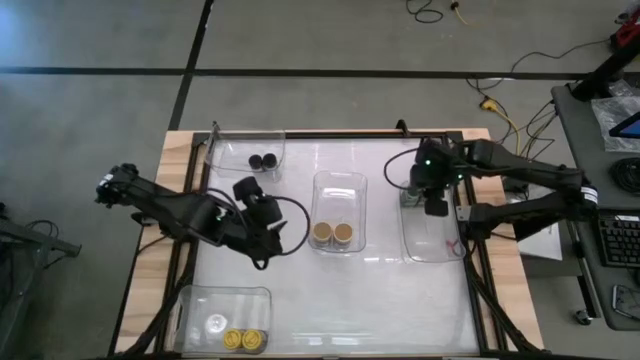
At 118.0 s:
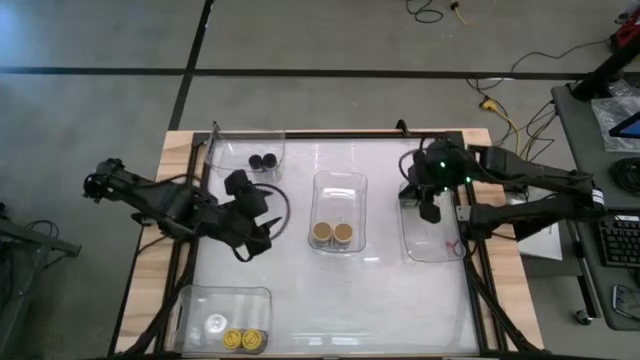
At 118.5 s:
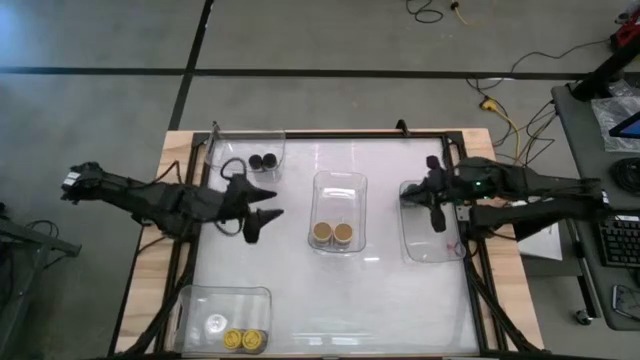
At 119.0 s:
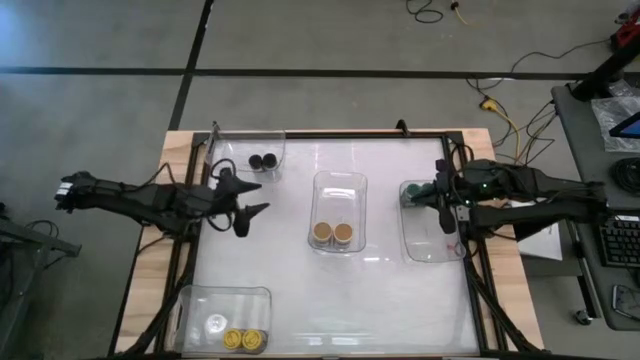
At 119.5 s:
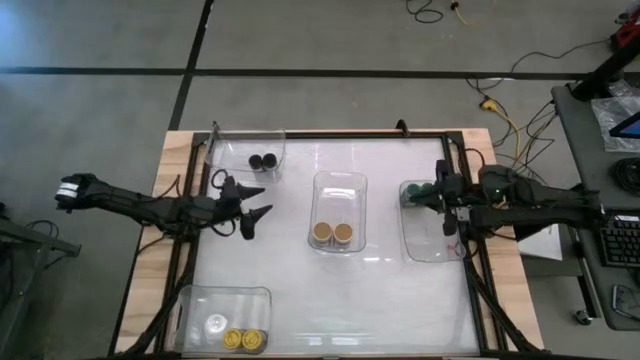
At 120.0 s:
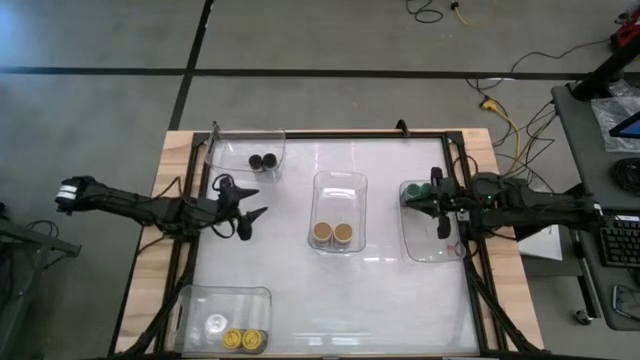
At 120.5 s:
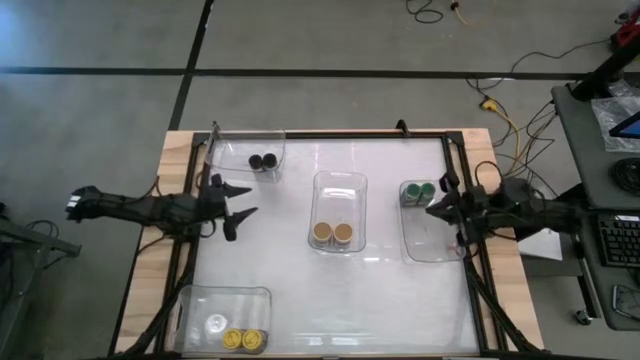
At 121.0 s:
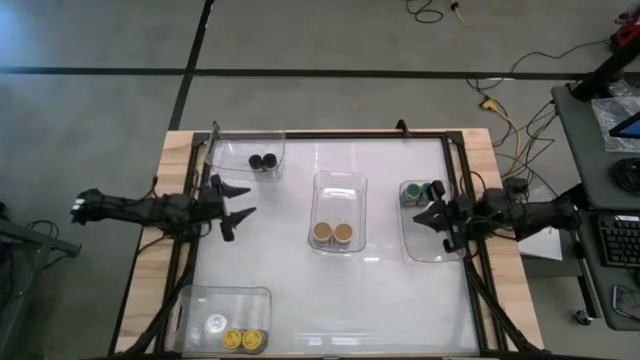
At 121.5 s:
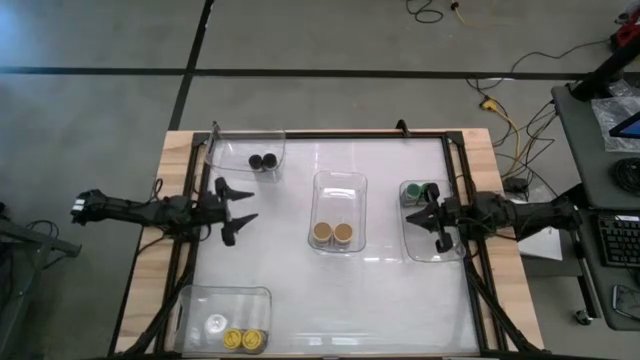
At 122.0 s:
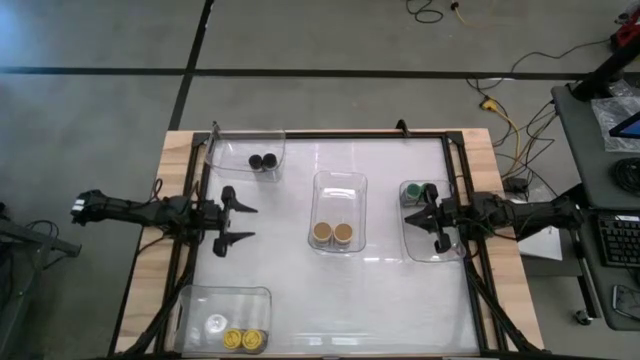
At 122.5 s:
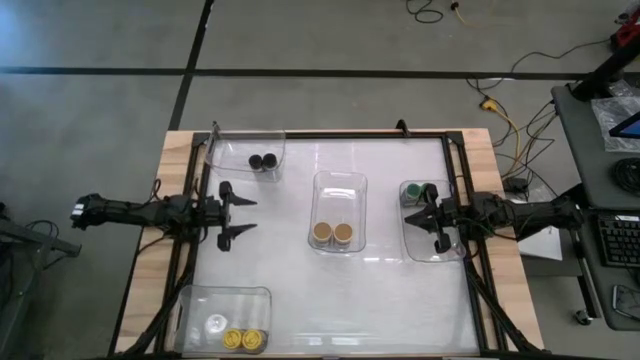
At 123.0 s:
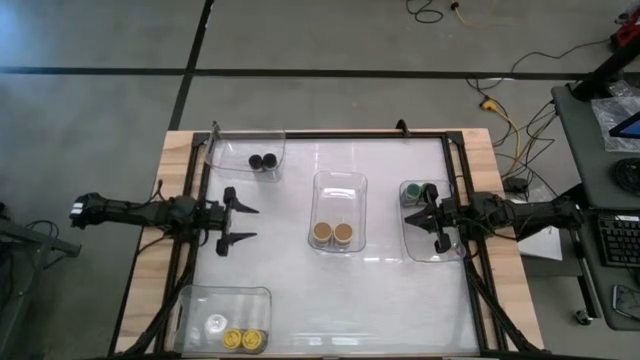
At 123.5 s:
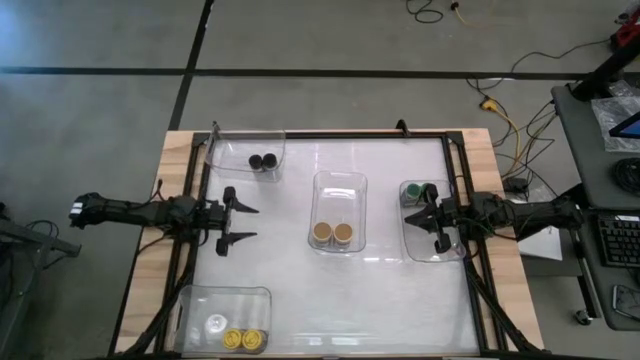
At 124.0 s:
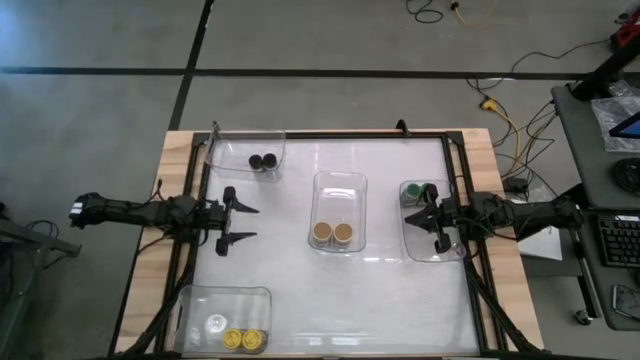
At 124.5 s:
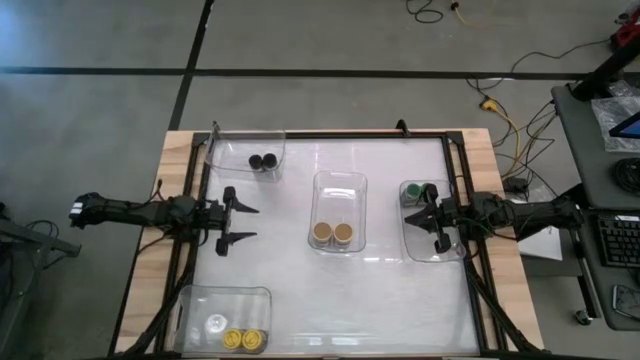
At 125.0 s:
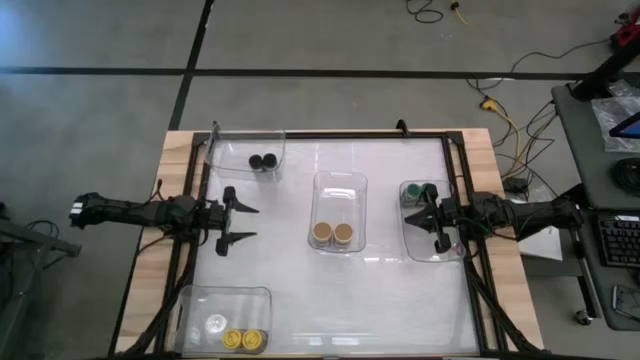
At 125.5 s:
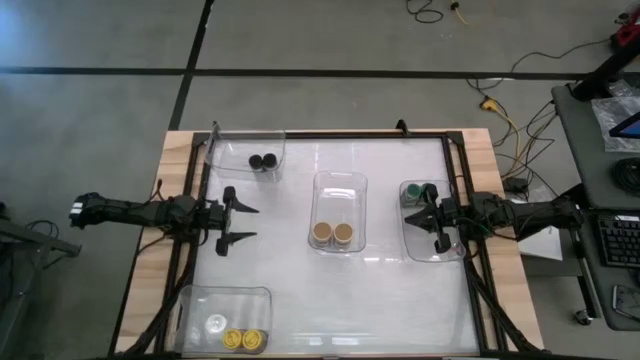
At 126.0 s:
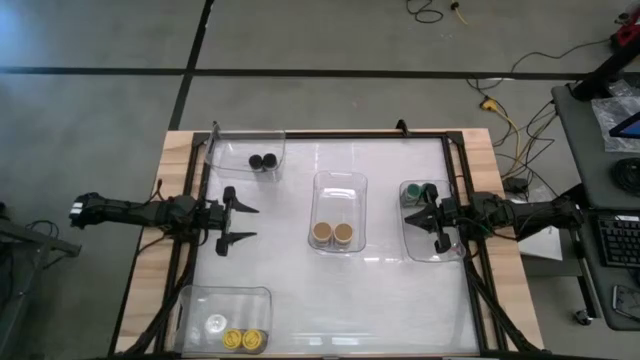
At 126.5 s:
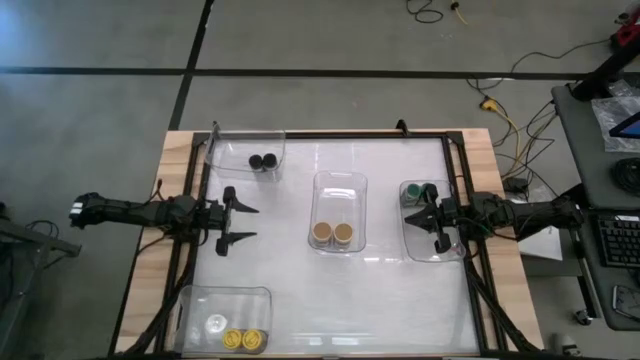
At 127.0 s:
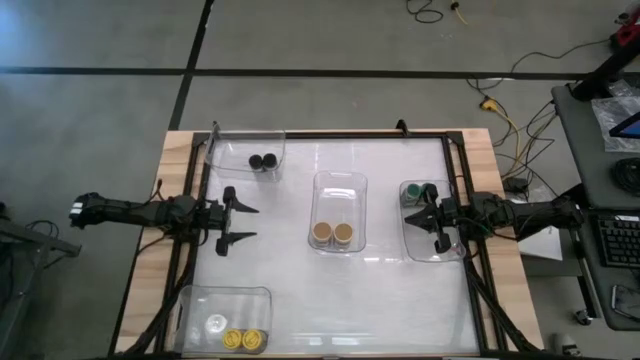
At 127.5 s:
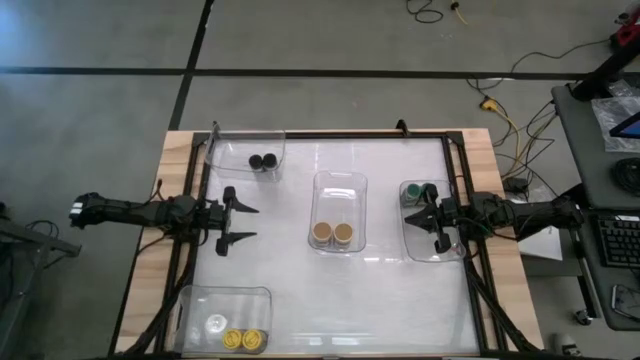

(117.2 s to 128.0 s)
Task: Sort spices by type
Return to Home Position

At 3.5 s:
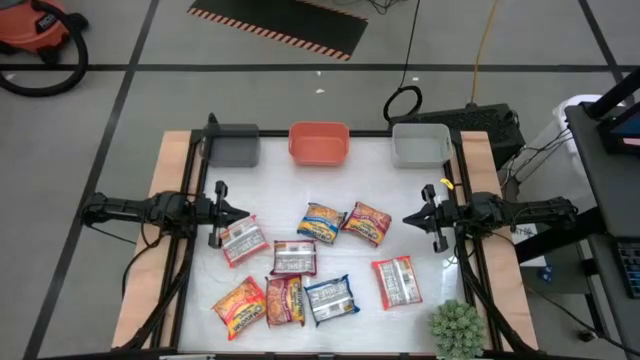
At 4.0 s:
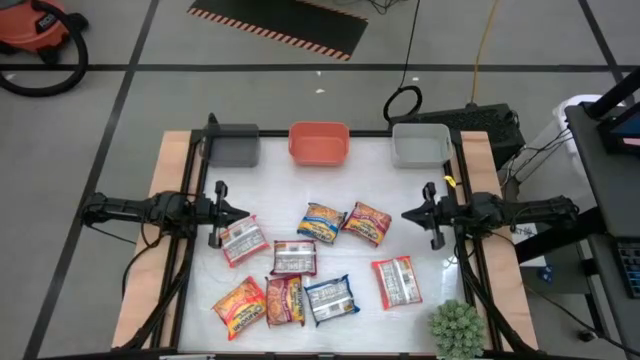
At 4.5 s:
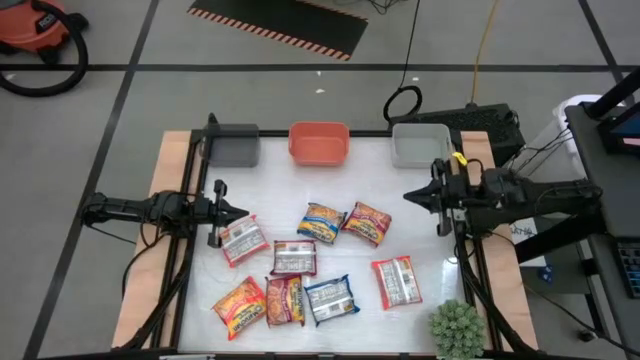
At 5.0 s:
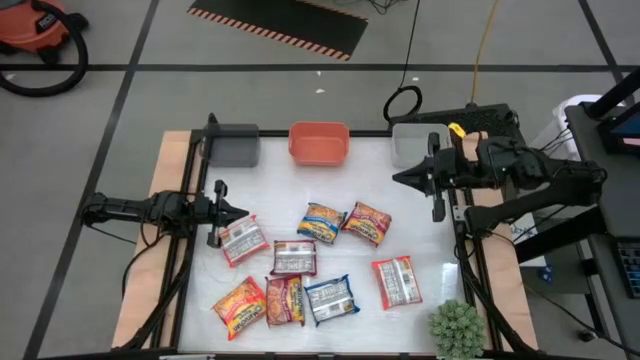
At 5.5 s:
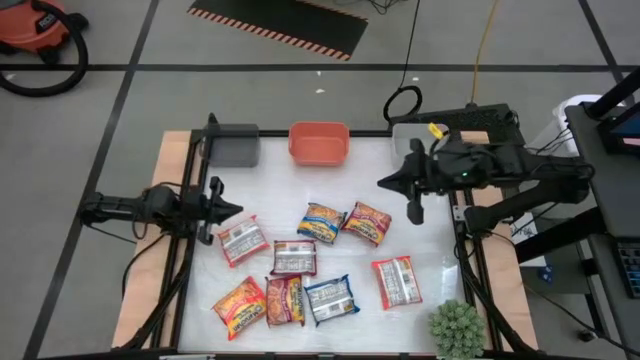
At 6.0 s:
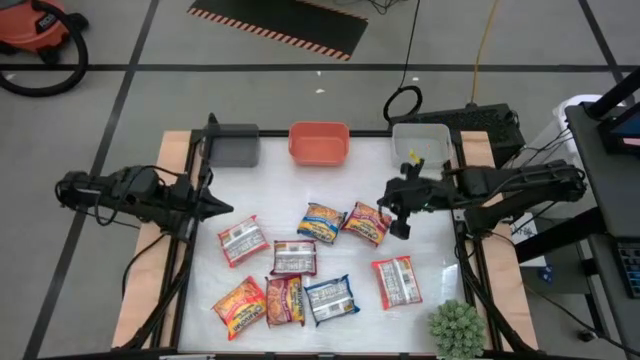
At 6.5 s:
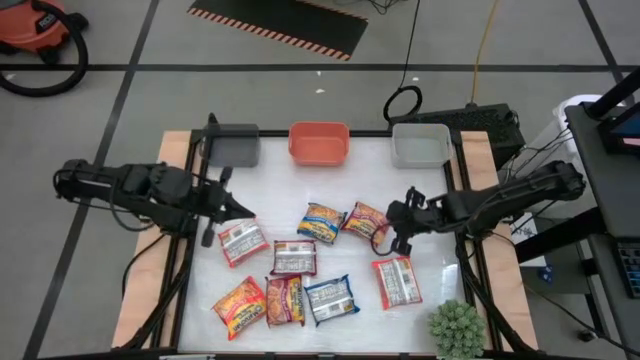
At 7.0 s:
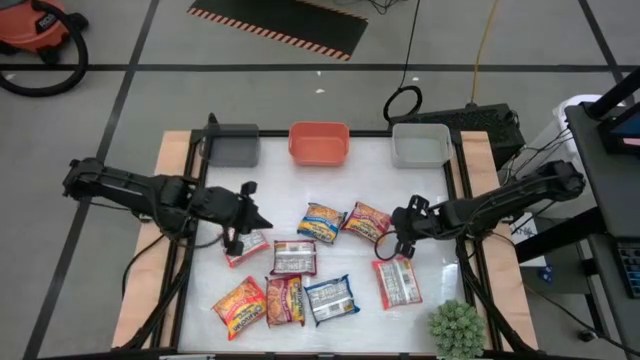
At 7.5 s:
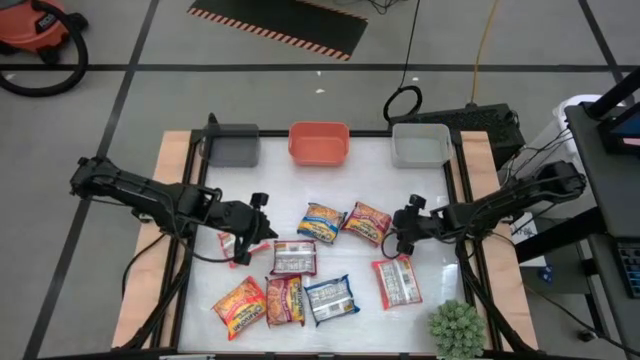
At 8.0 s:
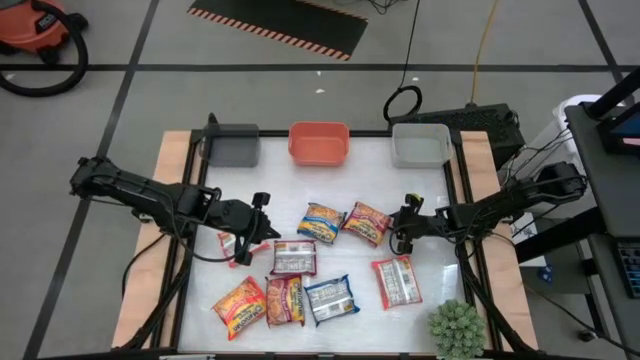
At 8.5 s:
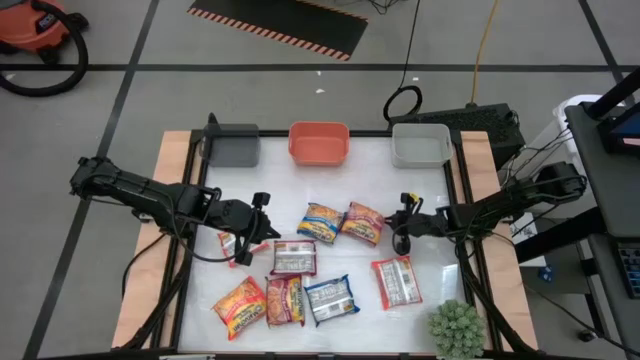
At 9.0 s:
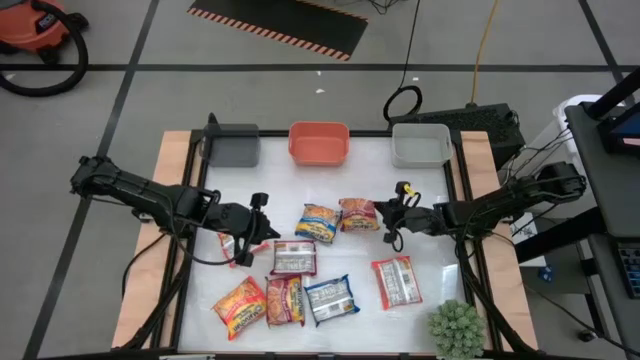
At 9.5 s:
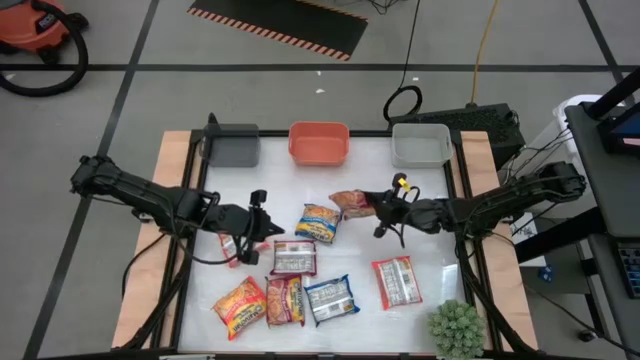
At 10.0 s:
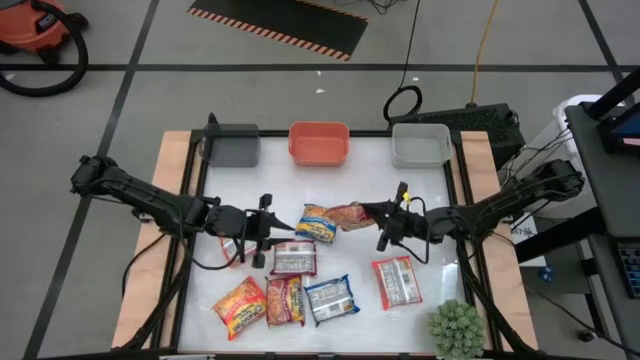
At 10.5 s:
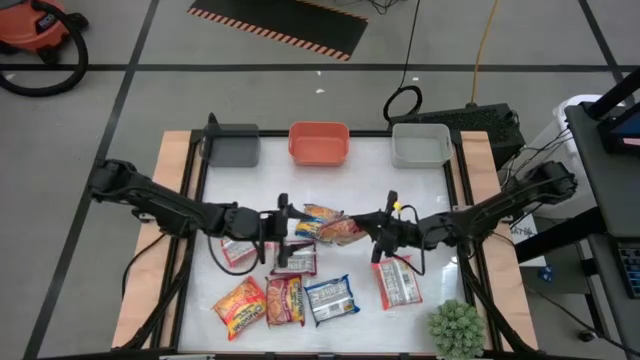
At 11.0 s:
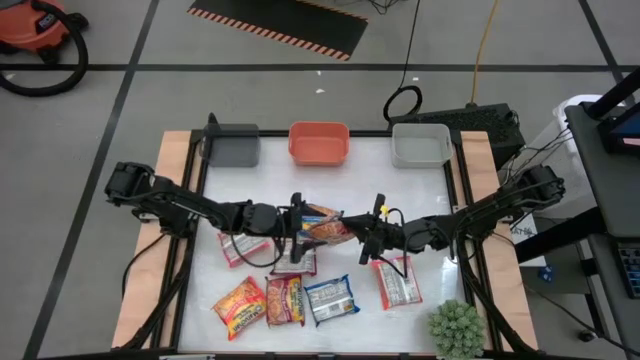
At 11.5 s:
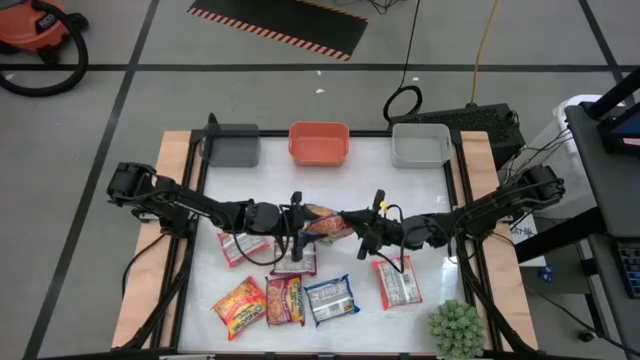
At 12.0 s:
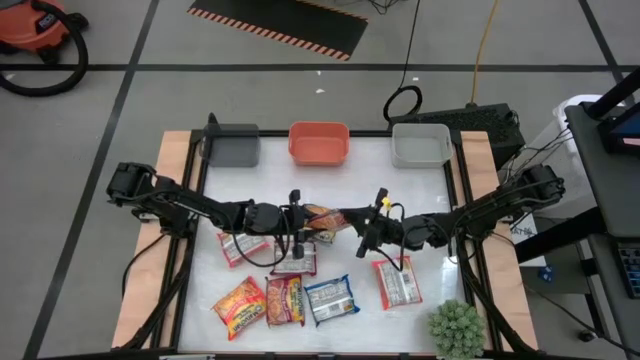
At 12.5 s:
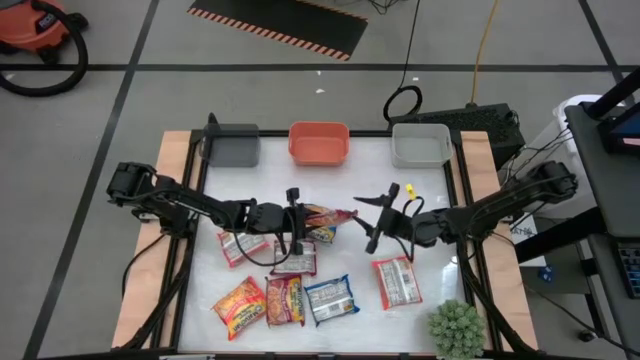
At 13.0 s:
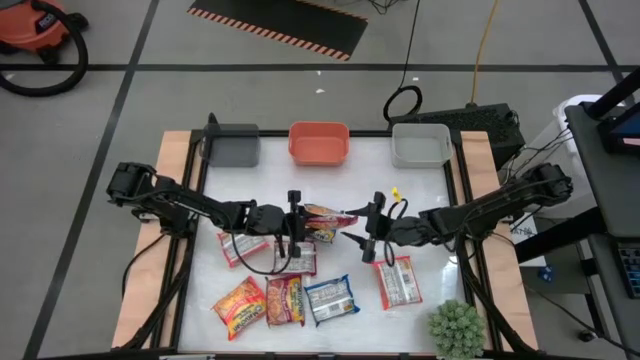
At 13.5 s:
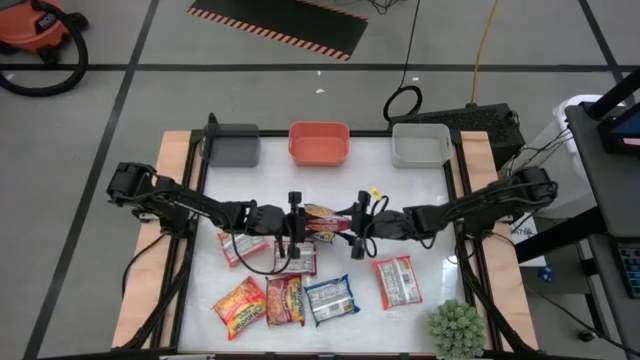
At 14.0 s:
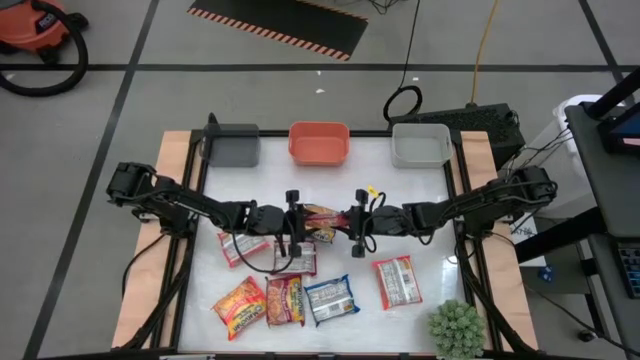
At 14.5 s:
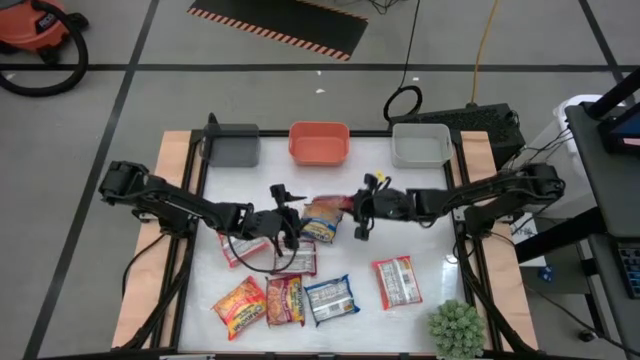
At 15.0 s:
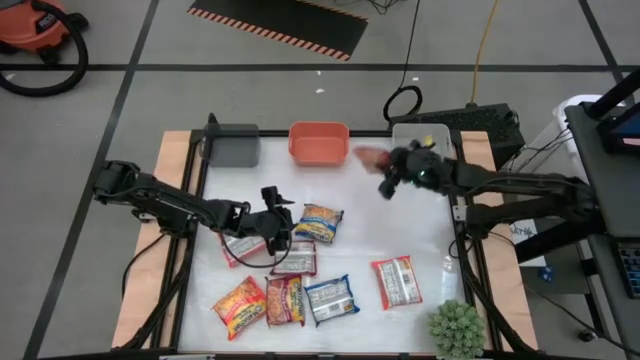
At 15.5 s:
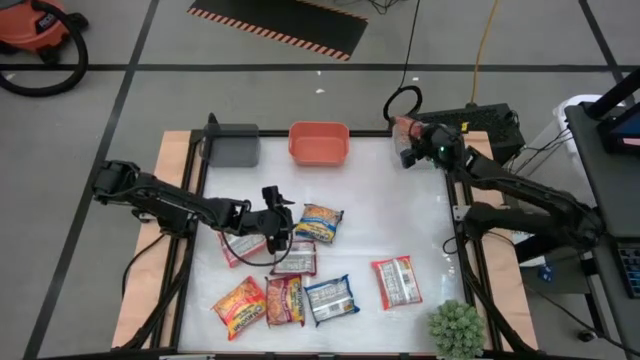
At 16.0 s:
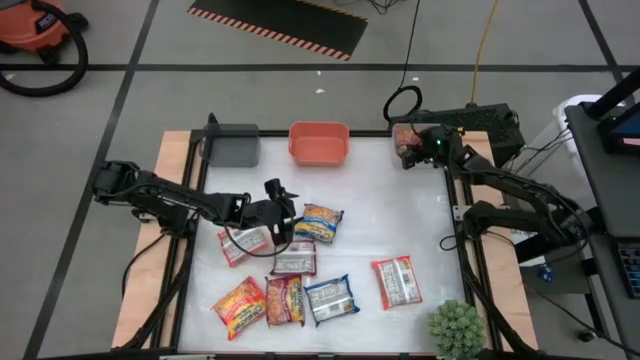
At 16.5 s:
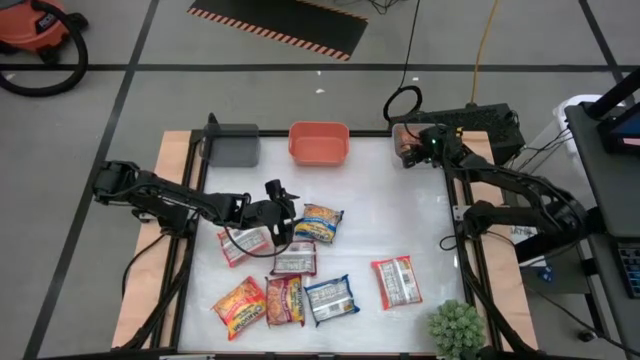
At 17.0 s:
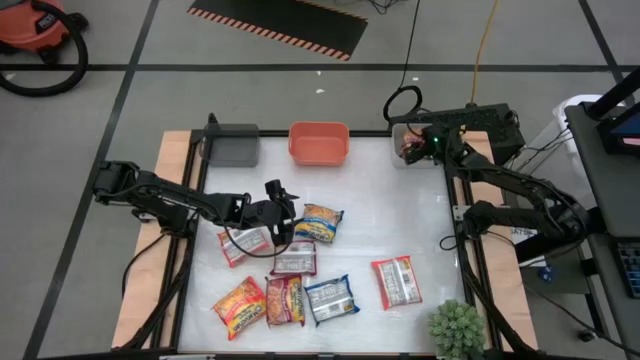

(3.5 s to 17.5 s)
Task: Sort Maruchan noodles
Put the top right red noodle pack into the gray bin
